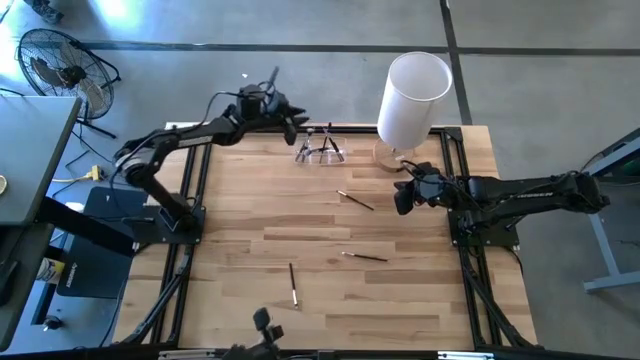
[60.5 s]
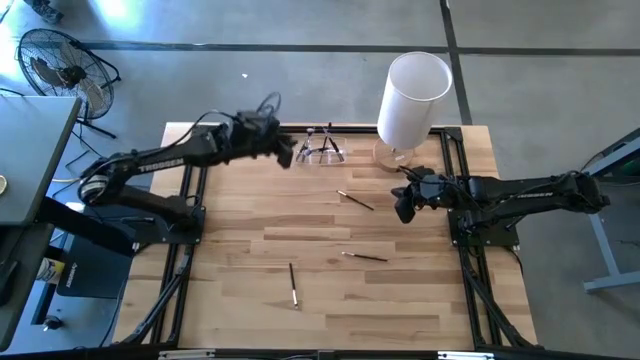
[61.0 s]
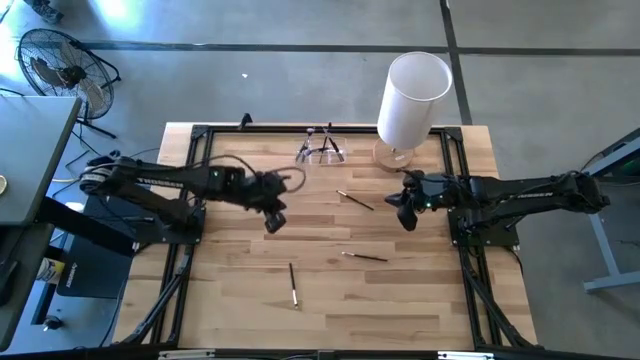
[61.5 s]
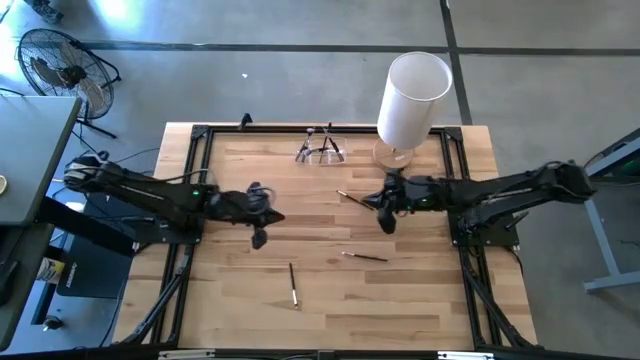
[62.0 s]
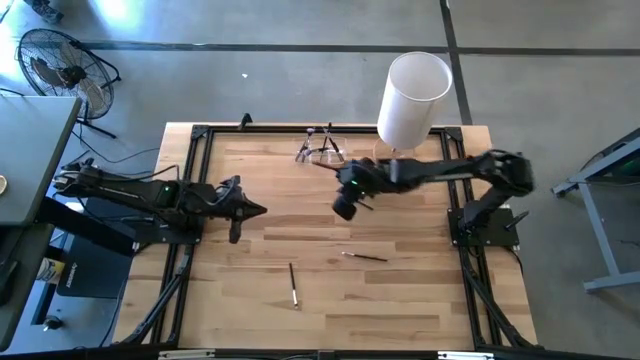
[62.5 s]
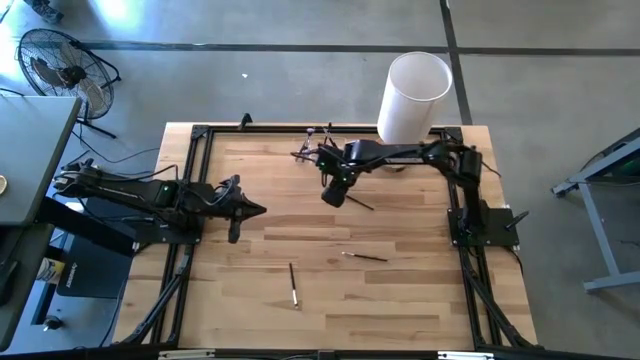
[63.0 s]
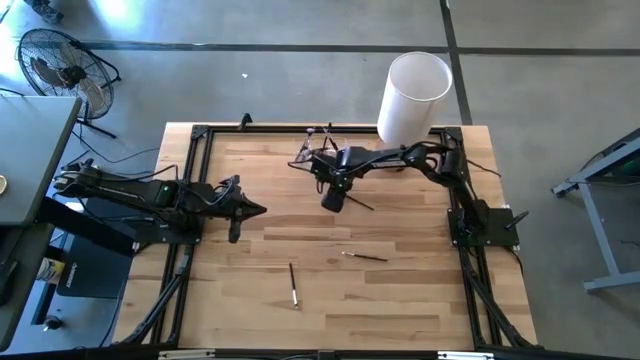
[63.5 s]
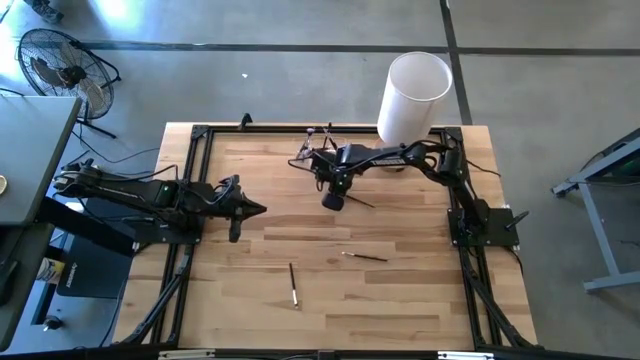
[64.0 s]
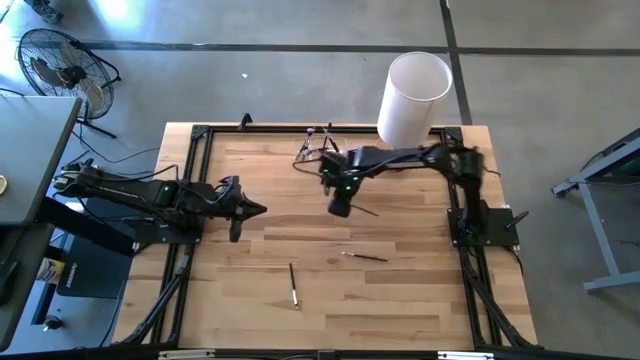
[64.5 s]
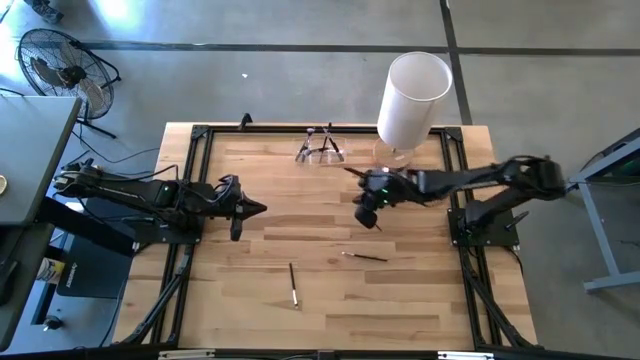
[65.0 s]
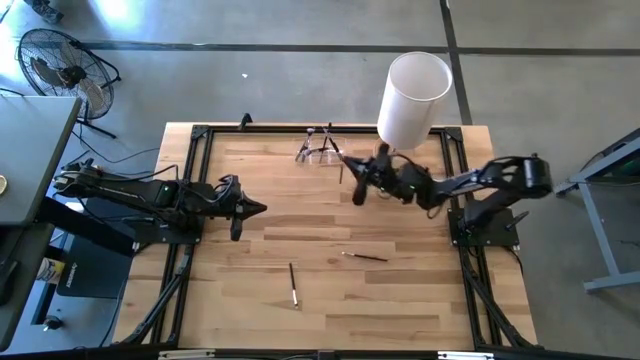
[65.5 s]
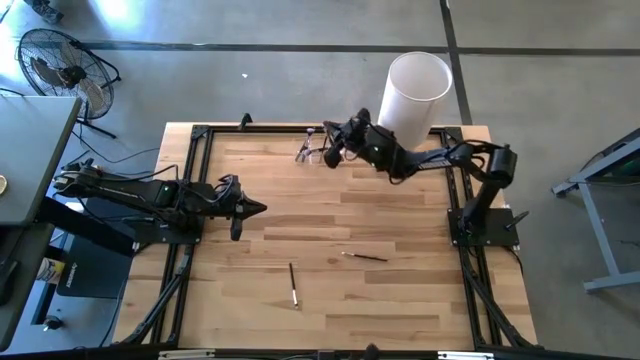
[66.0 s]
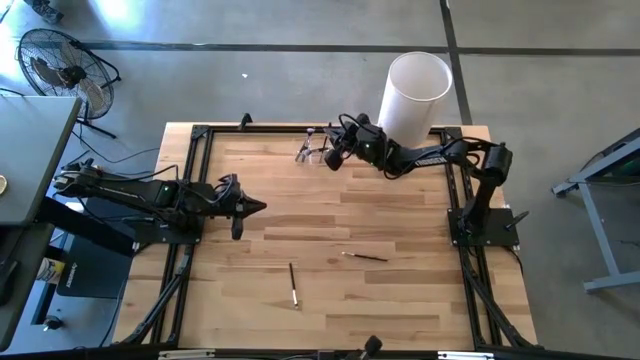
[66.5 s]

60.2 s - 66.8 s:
Task: Put items in baskets/containers
Put the black eyeshadow brush into the transparent organizer

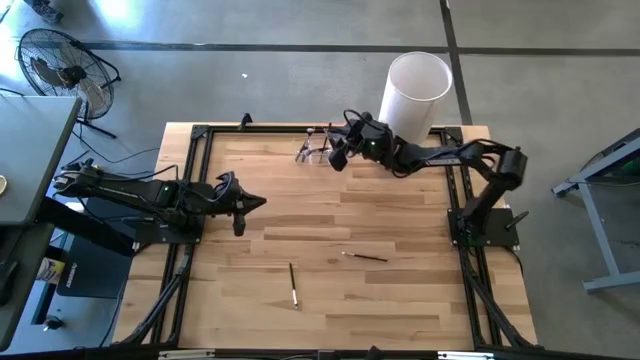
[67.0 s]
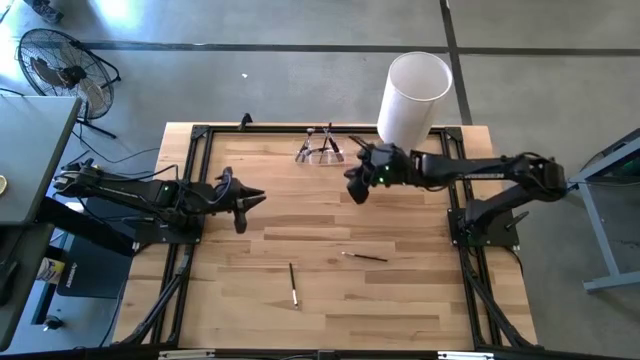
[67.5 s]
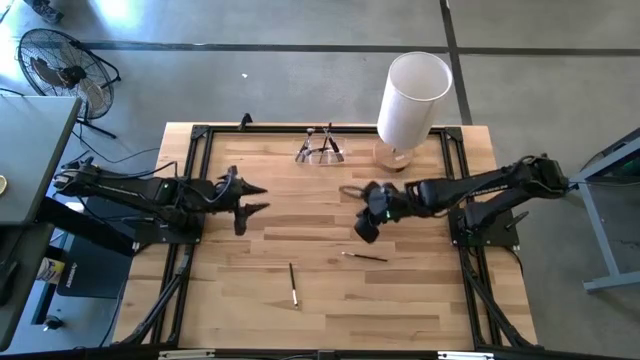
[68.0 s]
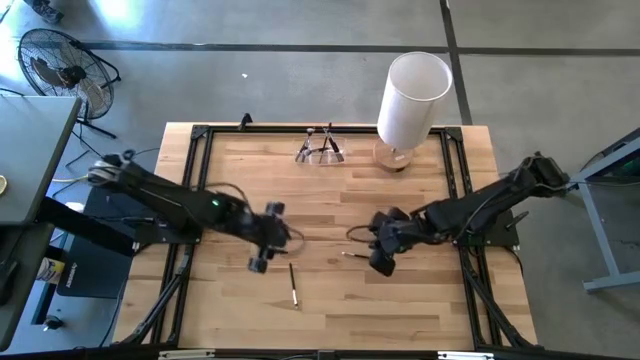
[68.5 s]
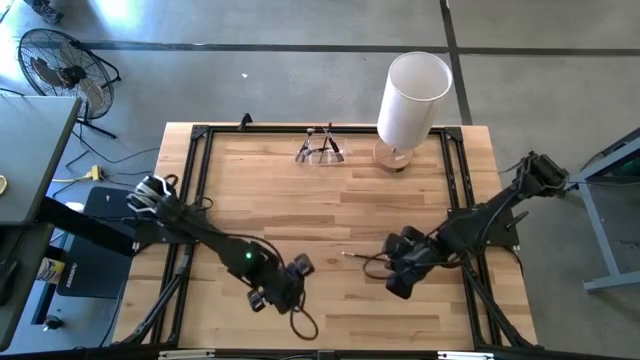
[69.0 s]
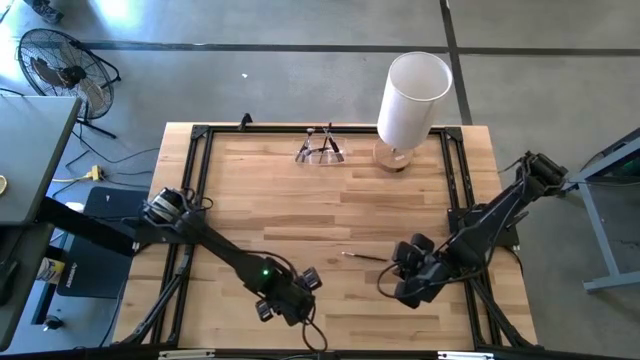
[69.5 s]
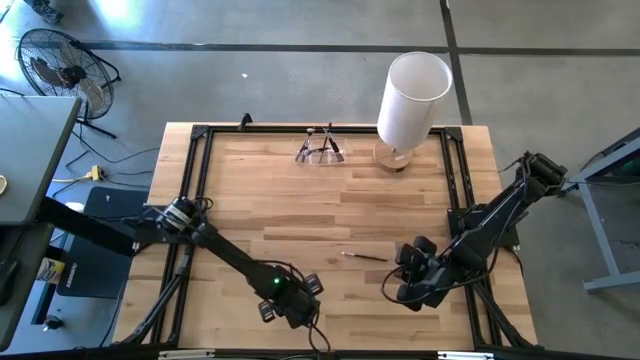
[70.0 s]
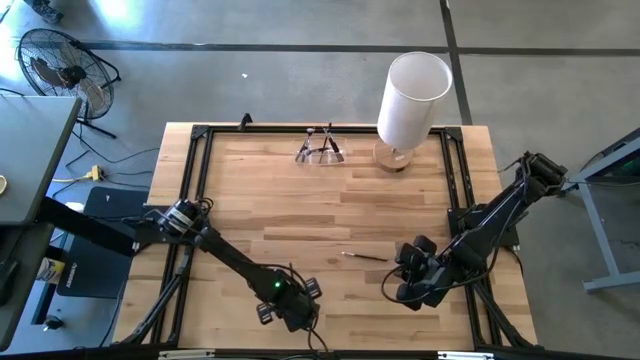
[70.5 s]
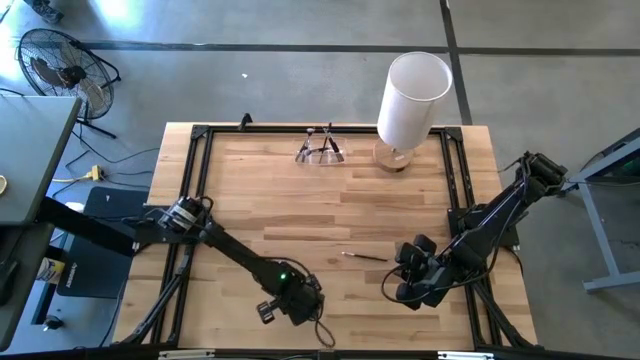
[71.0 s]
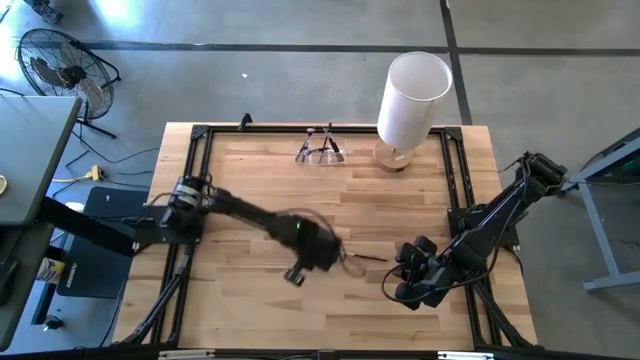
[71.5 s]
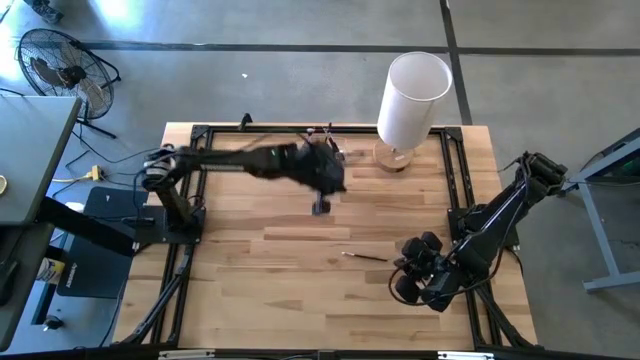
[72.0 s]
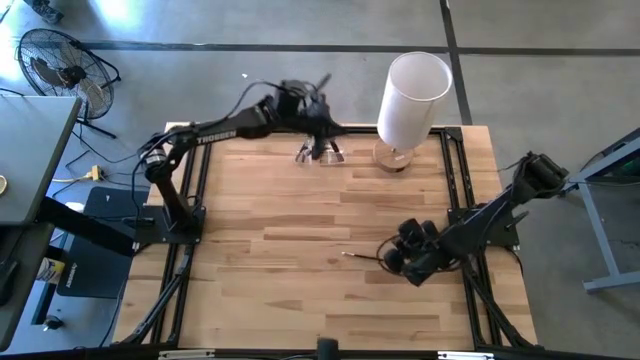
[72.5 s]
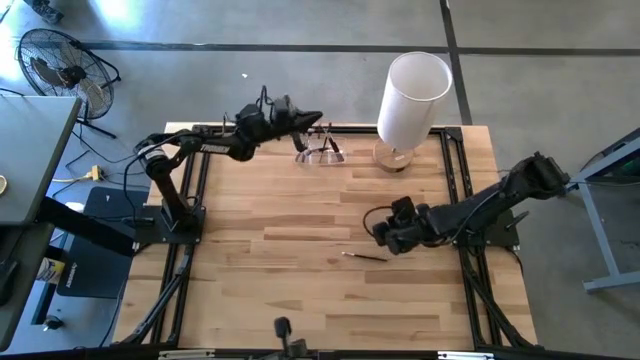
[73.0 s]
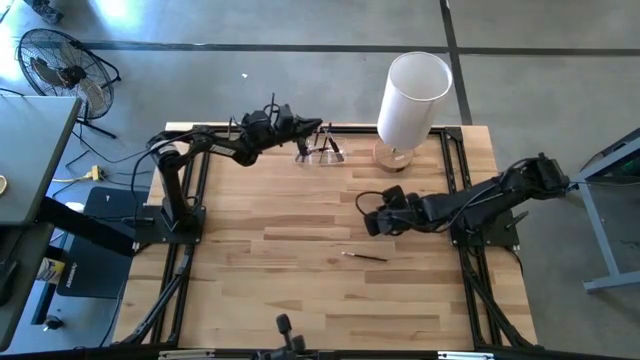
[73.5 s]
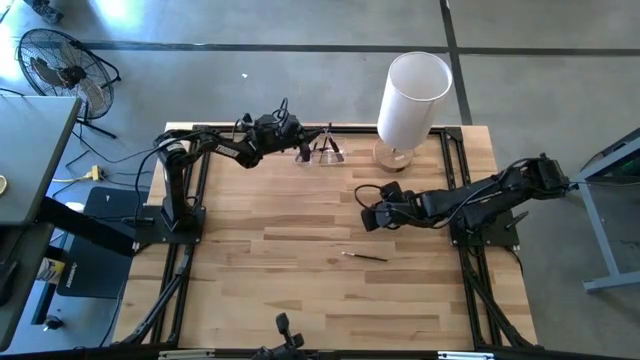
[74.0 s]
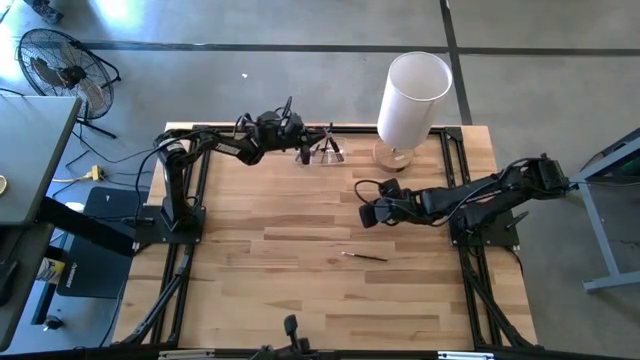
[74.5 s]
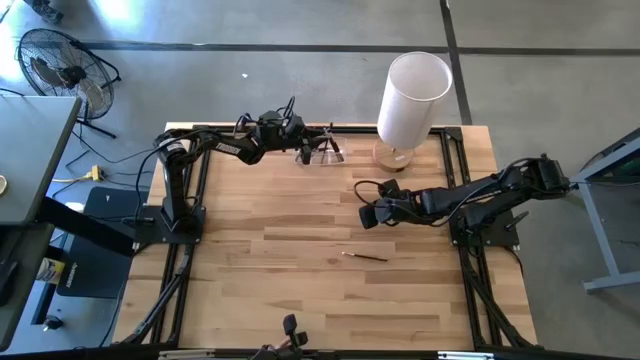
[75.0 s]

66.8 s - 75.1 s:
Put the black eyeshadow brush into the transparent organizer

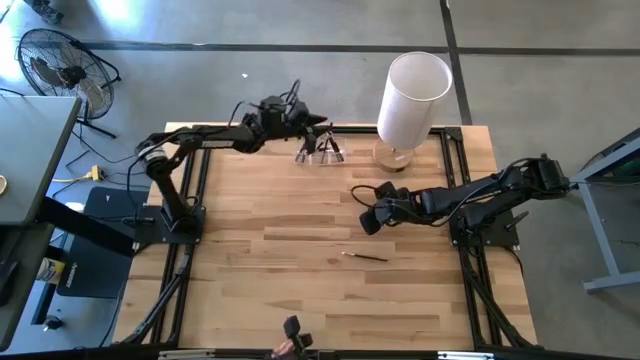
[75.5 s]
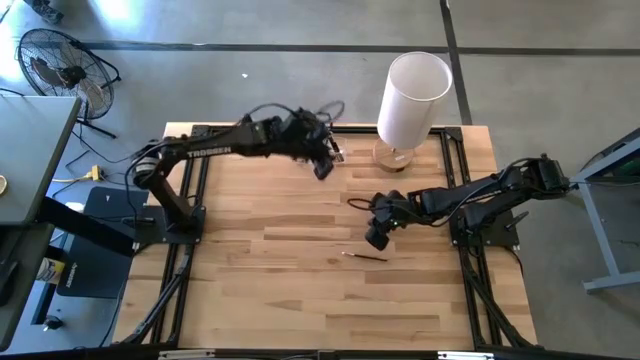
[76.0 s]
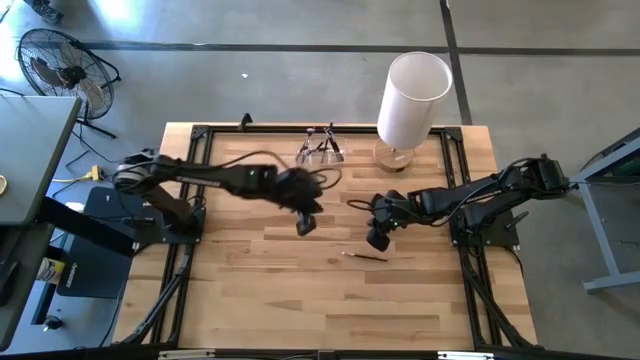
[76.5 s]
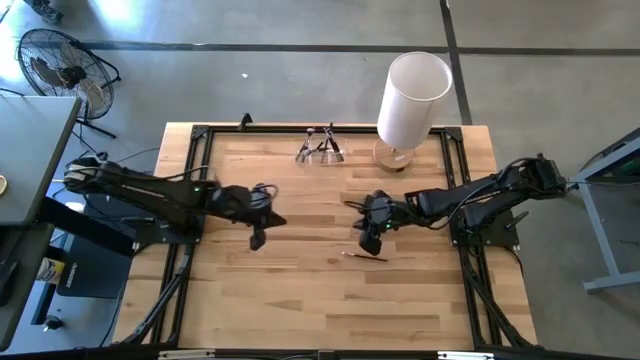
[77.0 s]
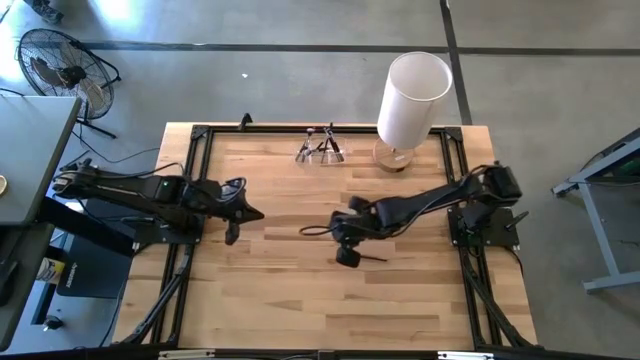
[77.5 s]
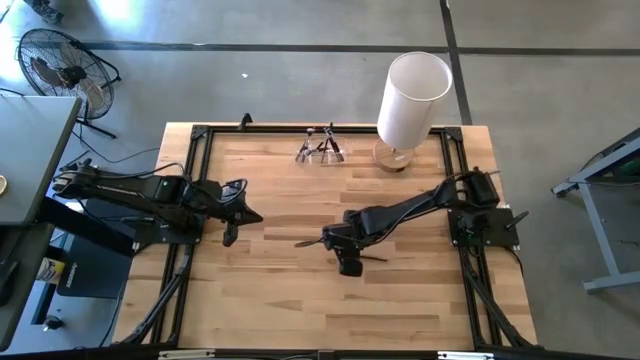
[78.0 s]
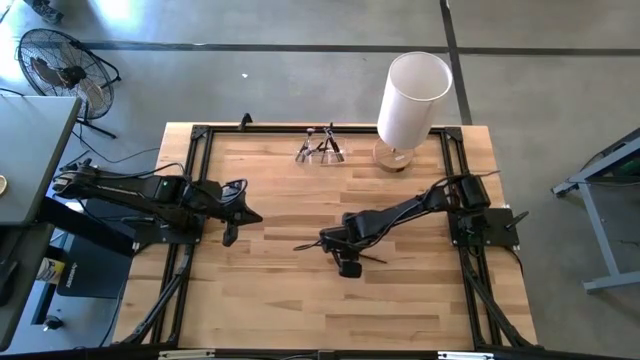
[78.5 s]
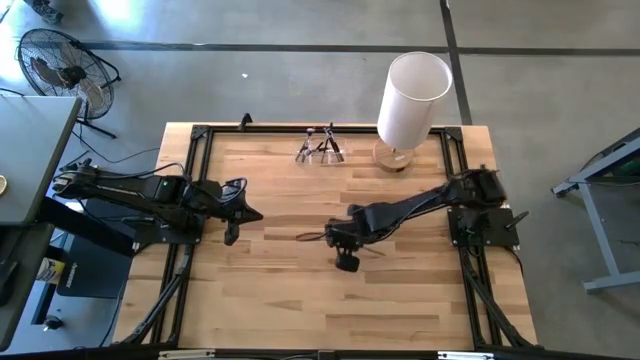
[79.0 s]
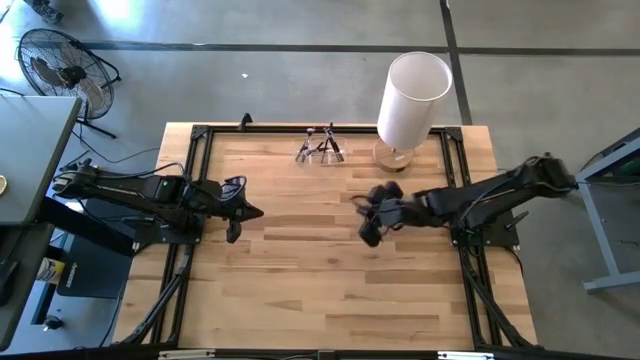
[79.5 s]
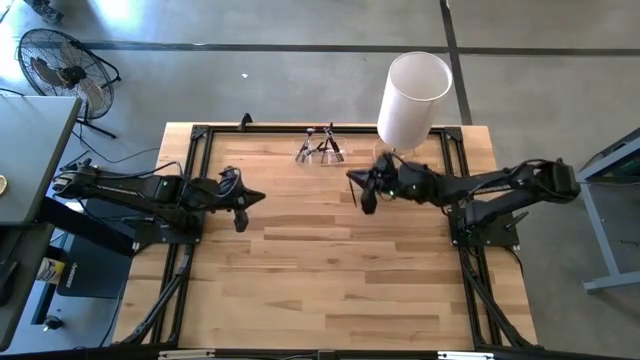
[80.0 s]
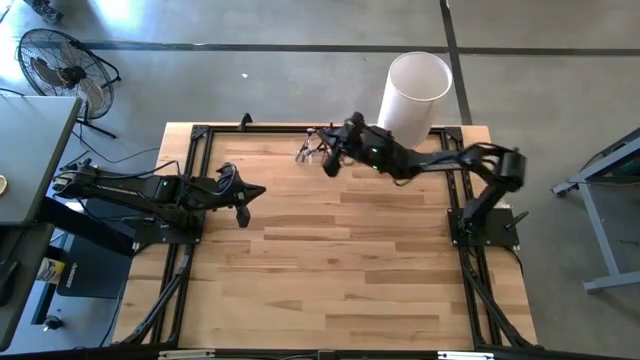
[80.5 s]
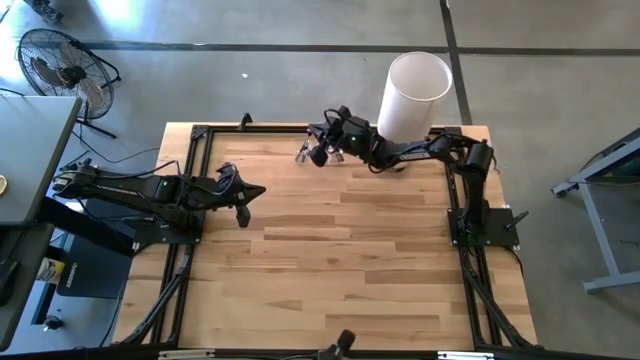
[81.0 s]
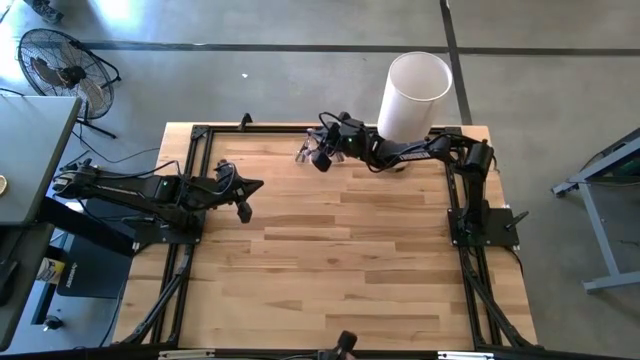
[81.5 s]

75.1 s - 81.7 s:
Put the black eyeshadow brush into the transparent organizer

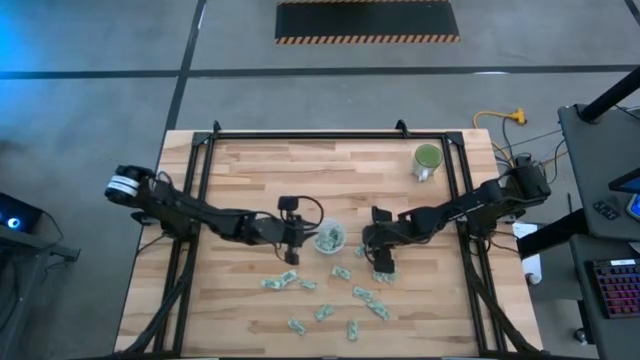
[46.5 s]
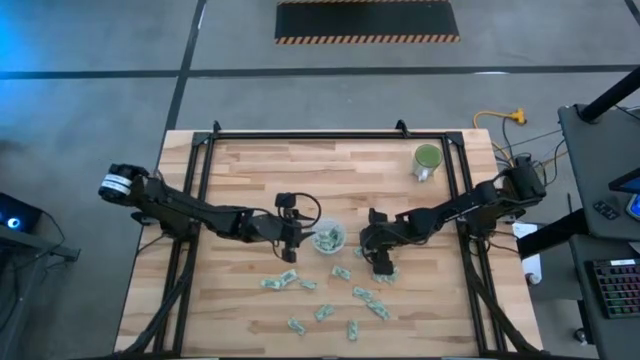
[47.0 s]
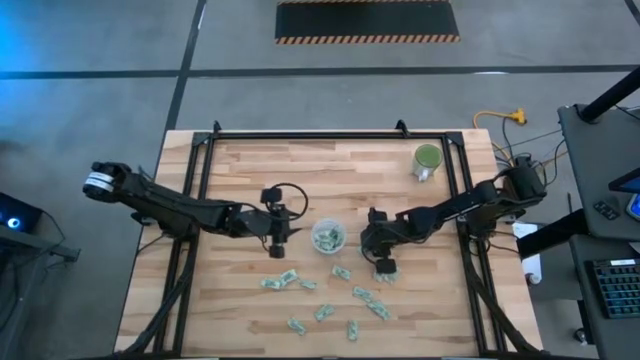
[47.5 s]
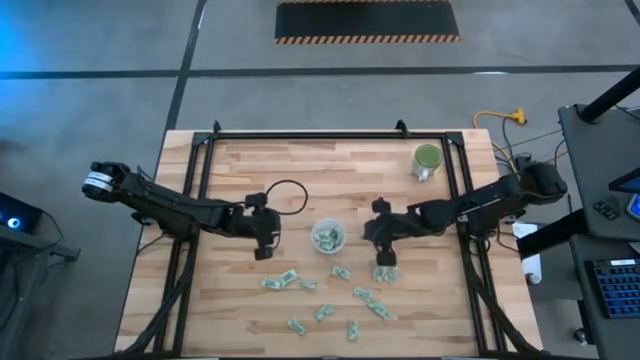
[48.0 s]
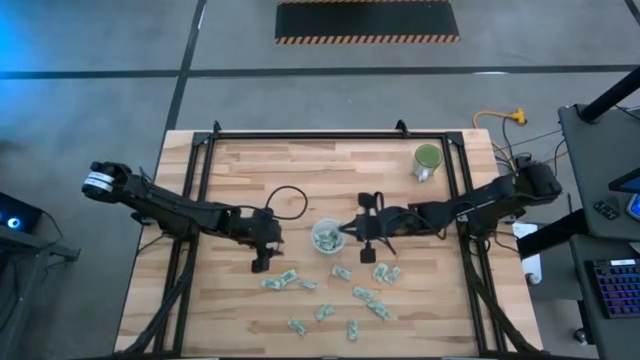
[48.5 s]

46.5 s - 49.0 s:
Task: Pick and place Stevia / Truvia into bins
Put the light green stevia packet into the transparent container
